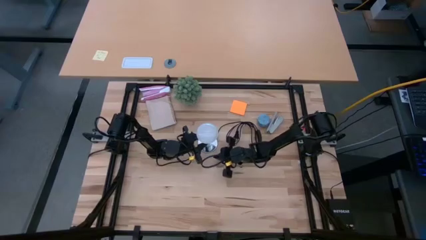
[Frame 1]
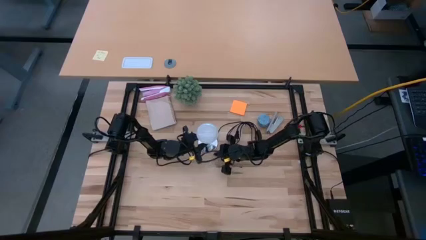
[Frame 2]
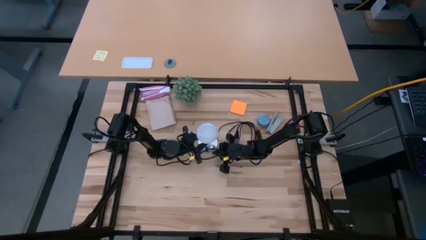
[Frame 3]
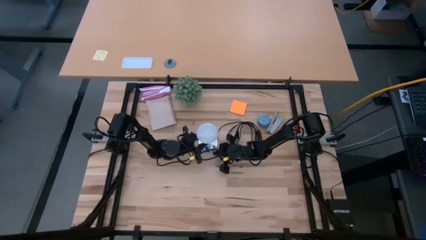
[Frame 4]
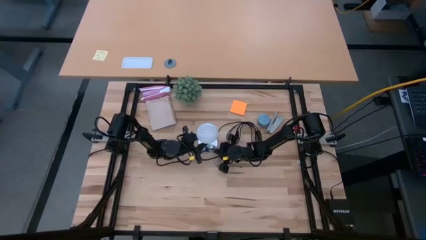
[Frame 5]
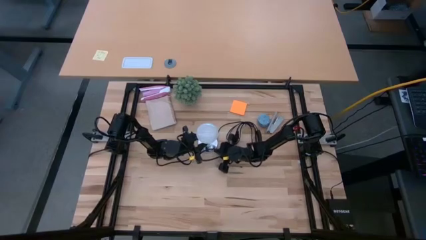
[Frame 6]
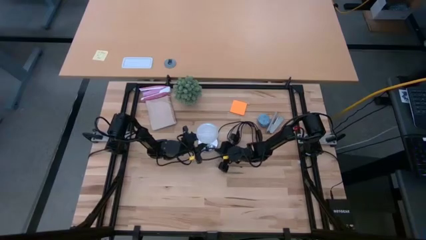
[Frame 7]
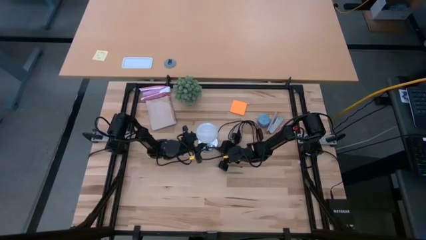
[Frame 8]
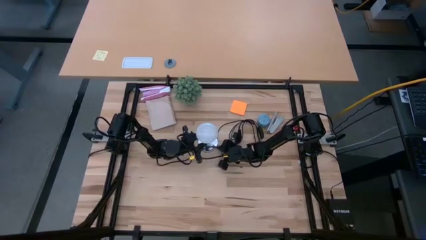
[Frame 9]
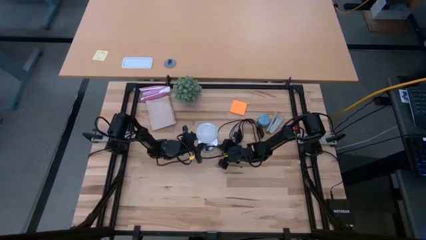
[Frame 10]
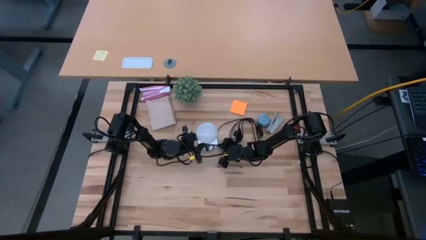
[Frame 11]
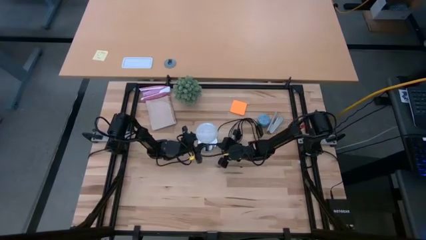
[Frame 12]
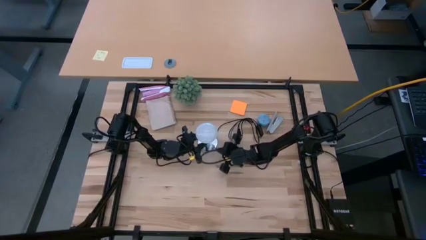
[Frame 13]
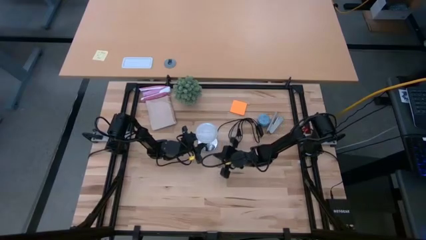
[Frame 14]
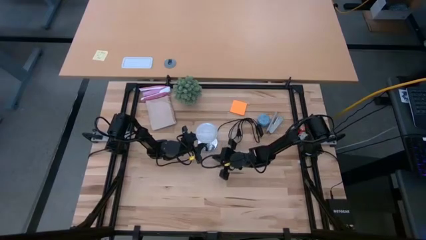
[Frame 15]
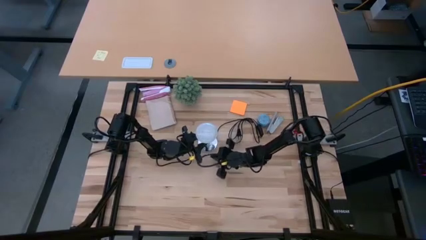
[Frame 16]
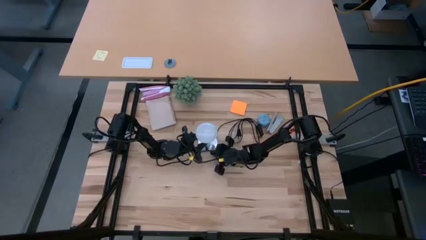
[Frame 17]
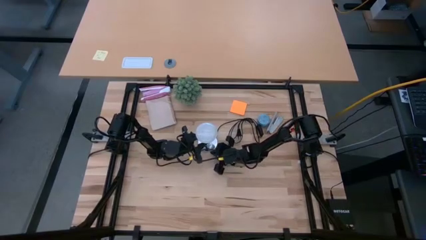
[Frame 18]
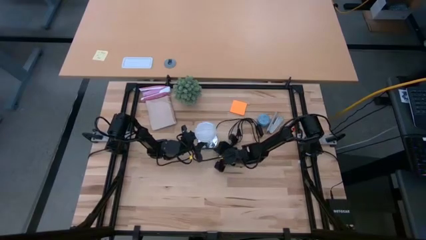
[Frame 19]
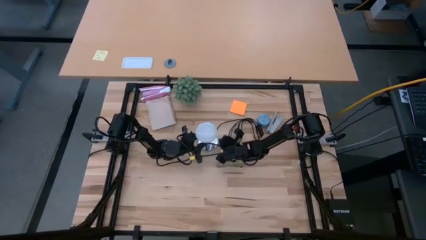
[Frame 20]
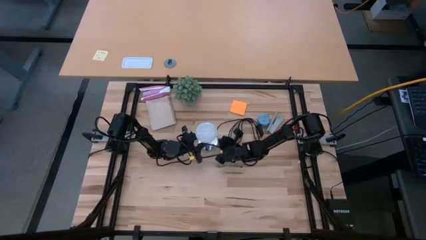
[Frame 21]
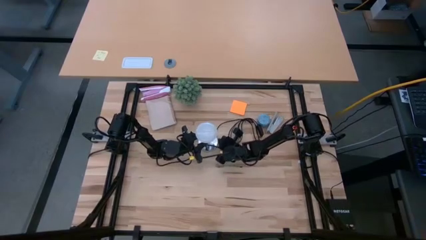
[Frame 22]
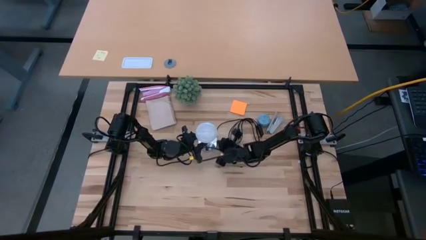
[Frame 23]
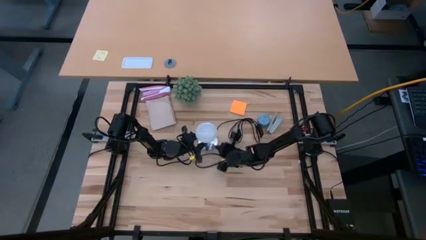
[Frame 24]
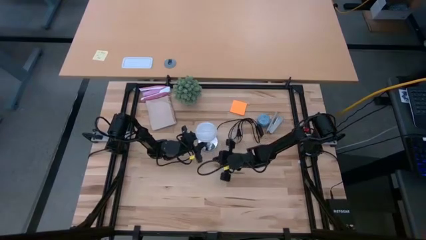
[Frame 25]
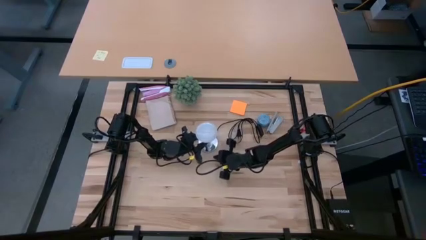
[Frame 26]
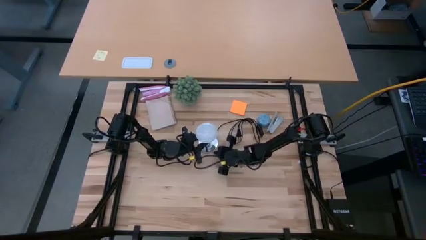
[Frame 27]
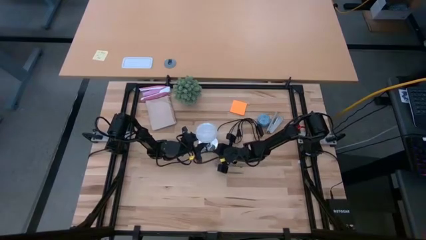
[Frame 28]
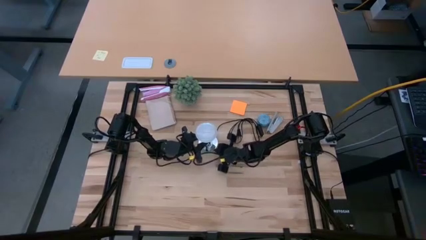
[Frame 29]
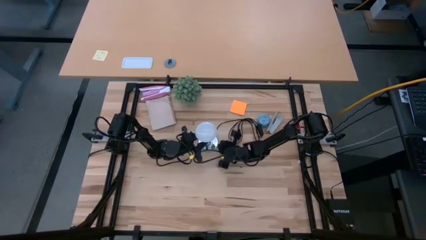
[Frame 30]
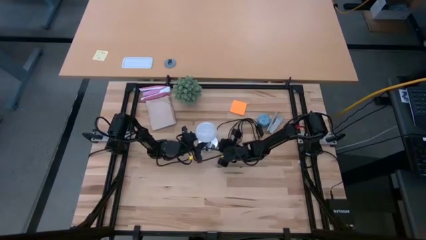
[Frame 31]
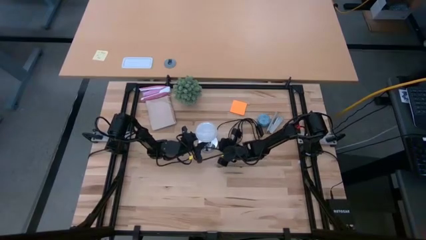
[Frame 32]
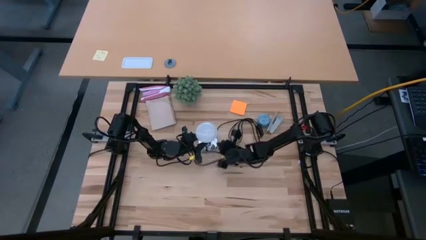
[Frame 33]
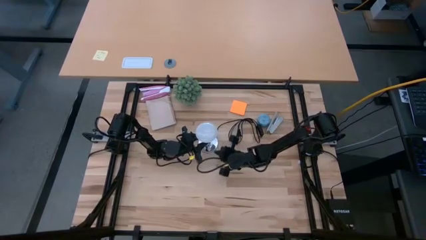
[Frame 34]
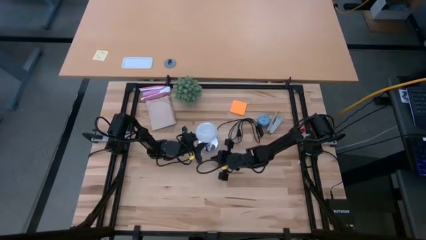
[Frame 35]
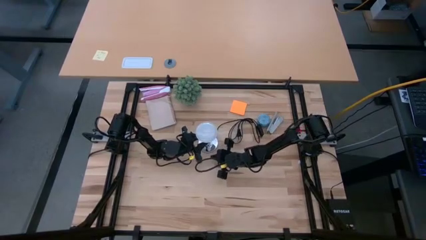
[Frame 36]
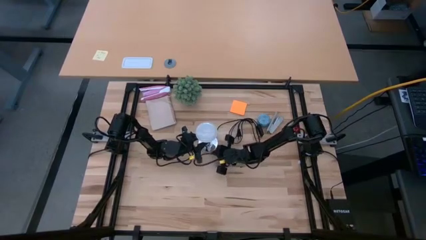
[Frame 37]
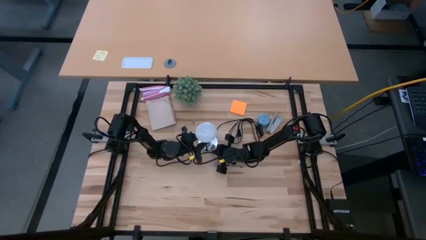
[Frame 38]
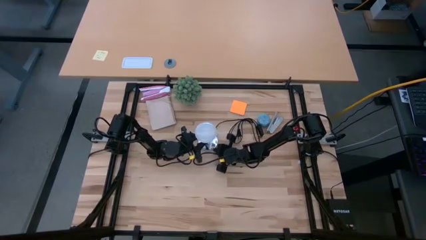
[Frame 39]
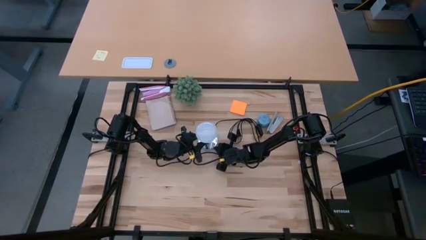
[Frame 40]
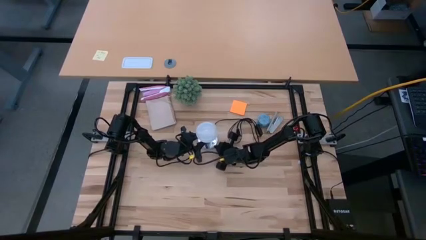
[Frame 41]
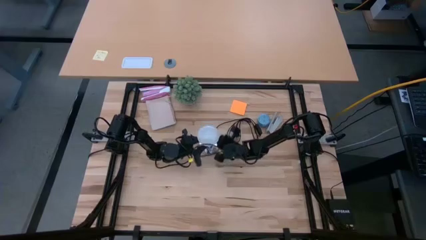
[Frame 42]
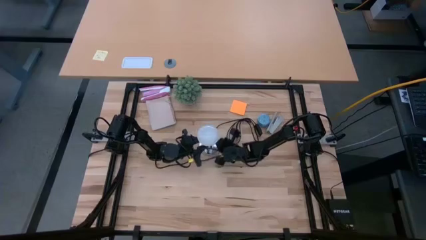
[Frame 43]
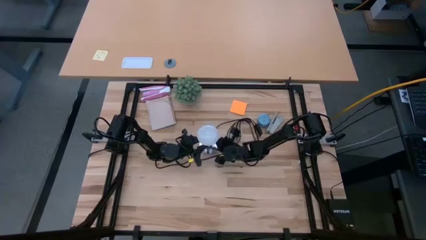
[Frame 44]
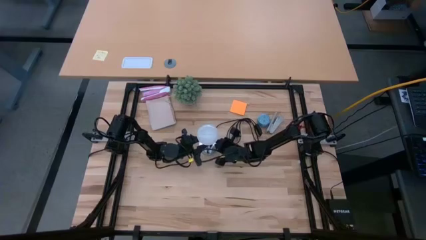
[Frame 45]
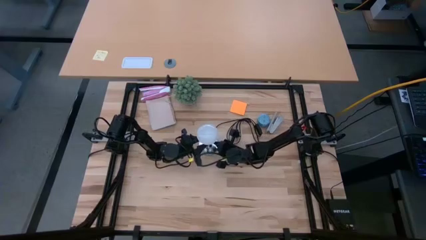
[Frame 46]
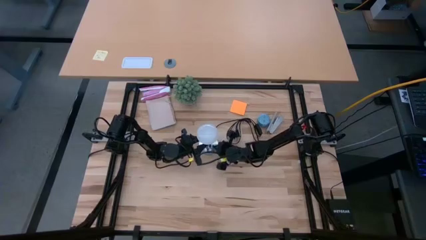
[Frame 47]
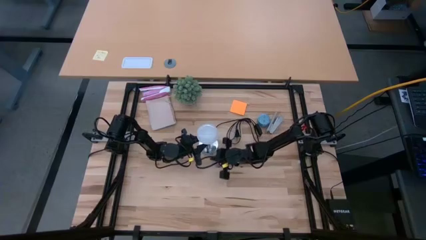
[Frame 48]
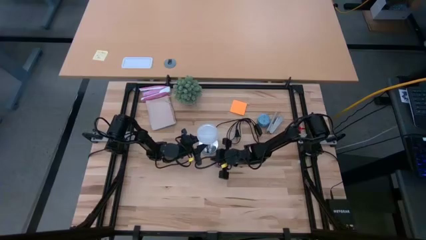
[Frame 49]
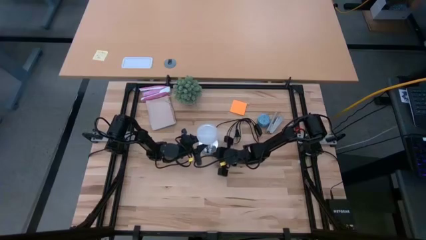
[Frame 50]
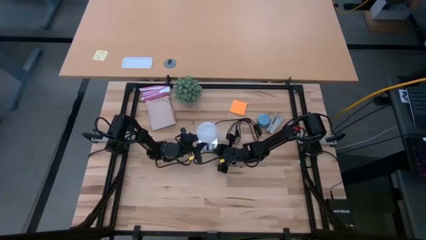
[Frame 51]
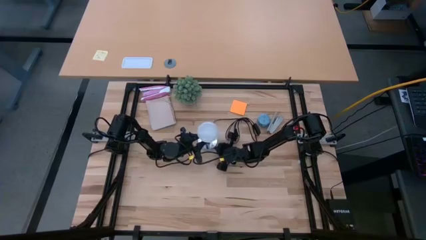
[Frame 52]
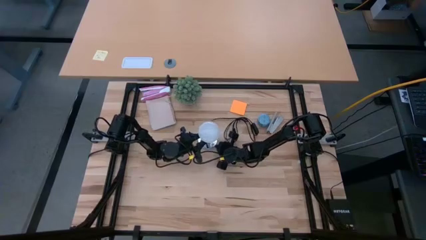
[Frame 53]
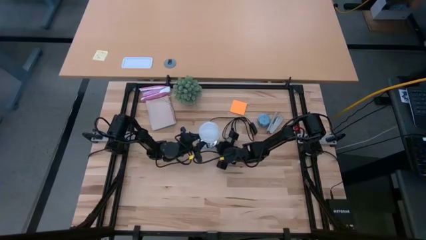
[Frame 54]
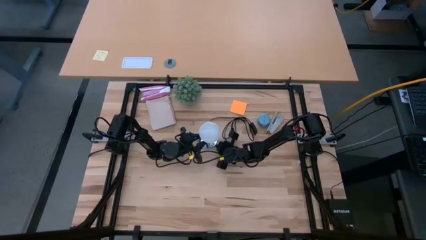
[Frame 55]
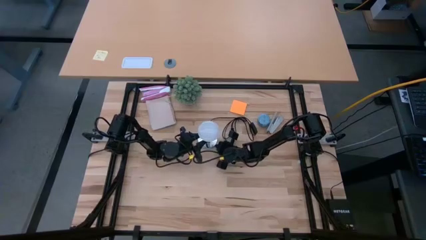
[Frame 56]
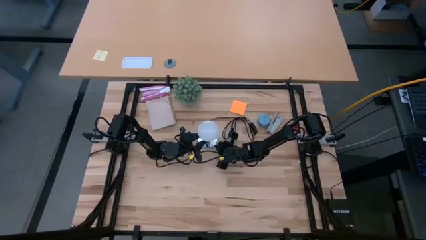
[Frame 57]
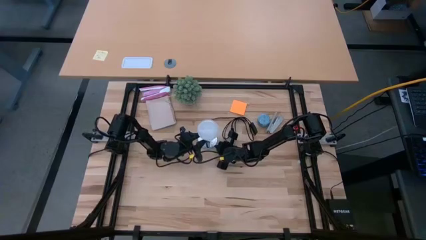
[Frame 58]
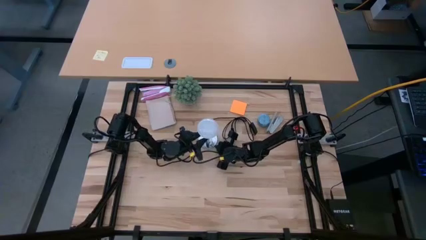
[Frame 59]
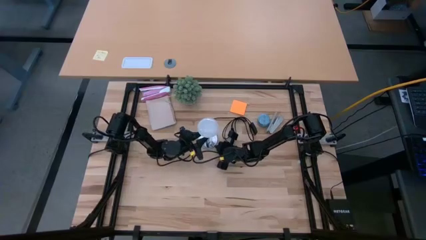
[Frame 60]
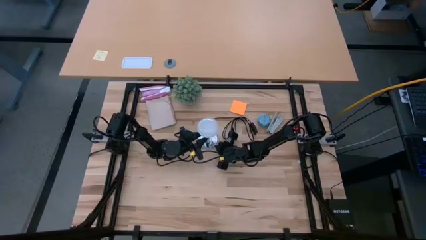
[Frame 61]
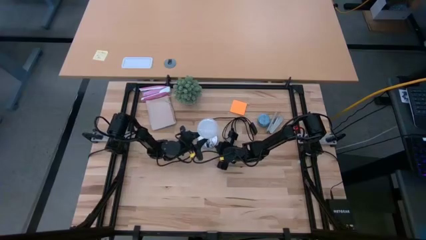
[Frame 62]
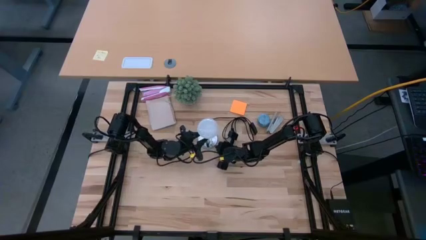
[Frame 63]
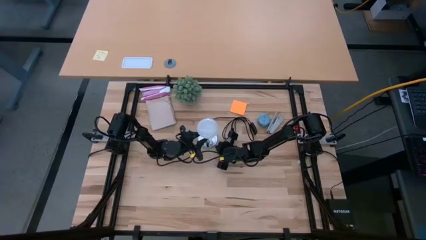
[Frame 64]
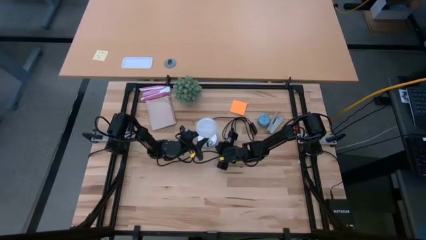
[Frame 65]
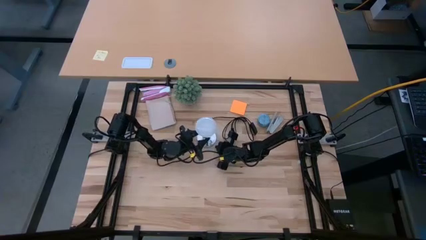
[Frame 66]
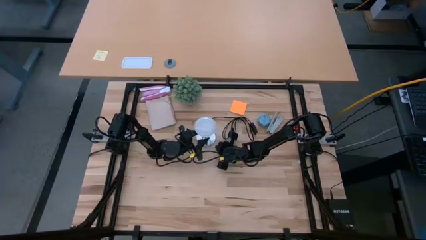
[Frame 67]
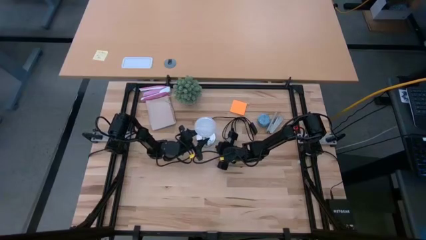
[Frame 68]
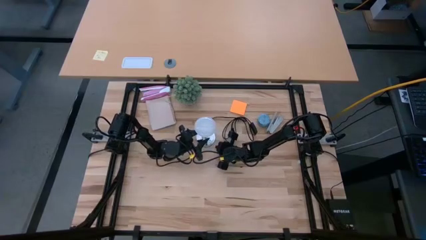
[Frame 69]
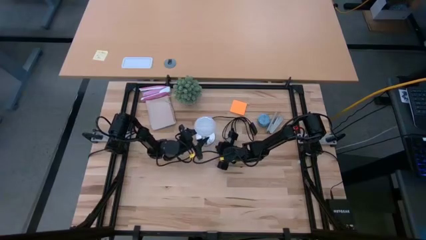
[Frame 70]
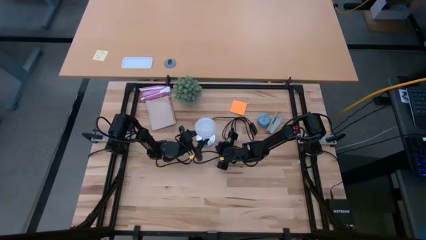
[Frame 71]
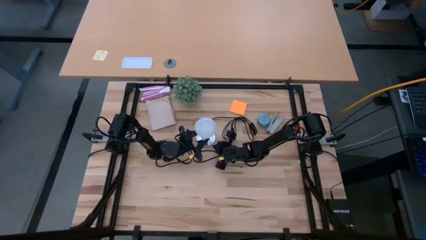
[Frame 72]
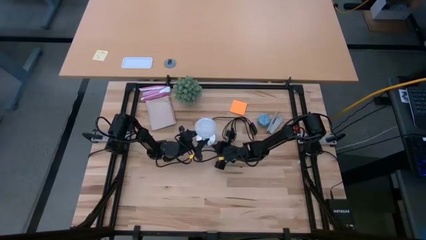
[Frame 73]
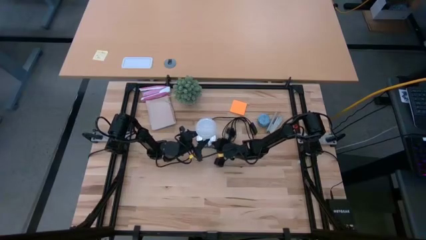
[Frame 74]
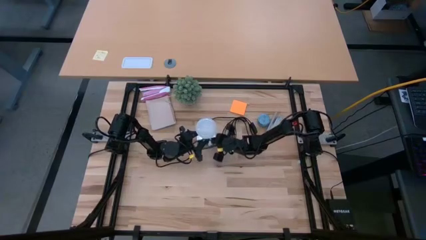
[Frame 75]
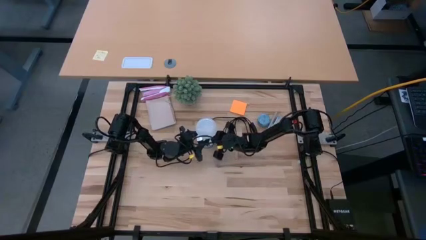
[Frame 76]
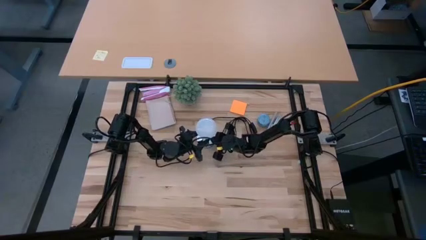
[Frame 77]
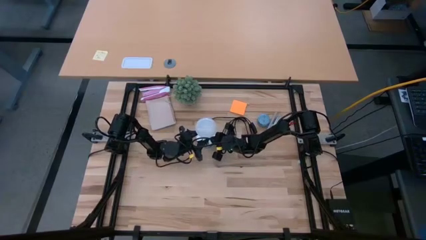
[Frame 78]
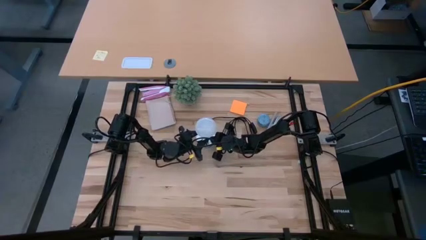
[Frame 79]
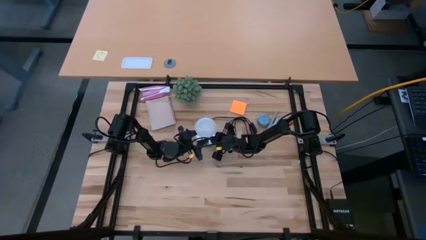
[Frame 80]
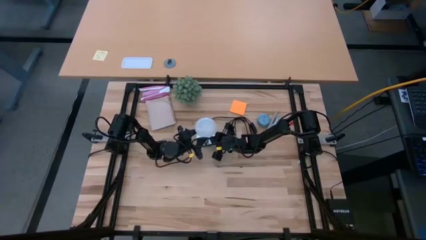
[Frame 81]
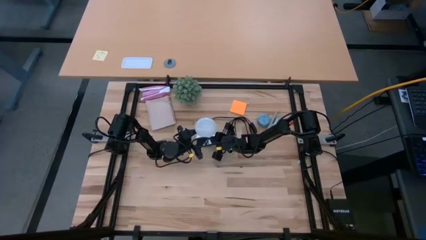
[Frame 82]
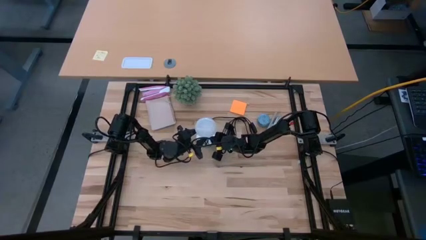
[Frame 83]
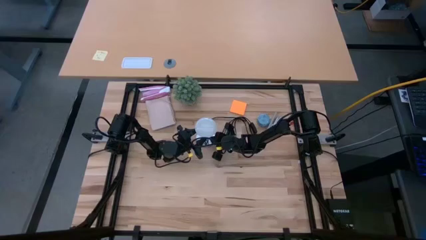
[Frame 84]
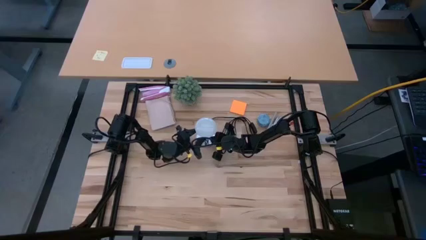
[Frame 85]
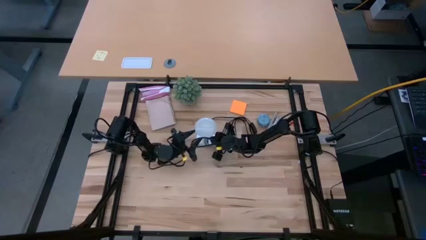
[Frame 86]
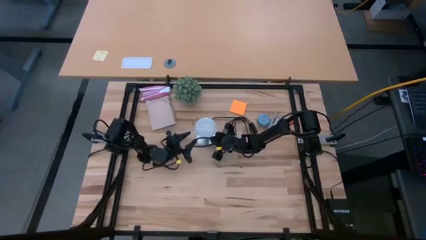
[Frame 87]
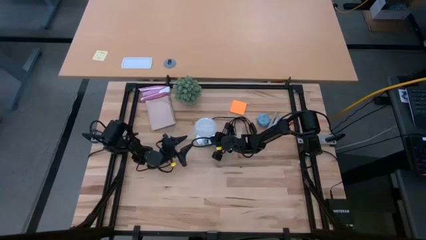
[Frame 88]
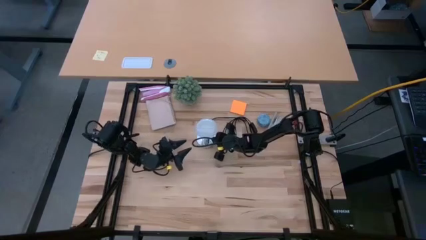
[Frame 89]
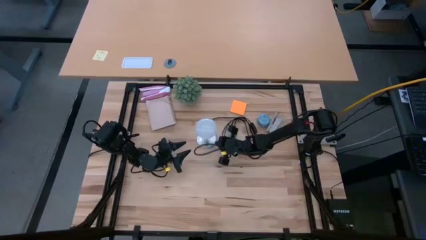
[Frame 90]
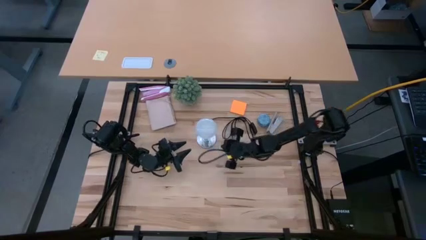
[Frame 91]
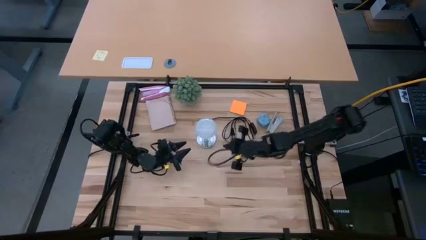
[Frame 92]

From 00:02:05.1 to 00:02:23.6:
Task: Screw lightbulb
Insert the white lightbulb into the silver lamp
